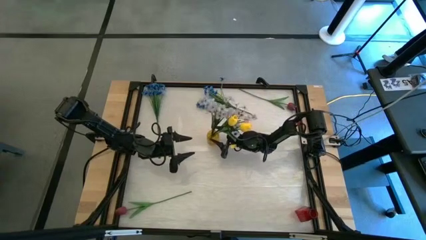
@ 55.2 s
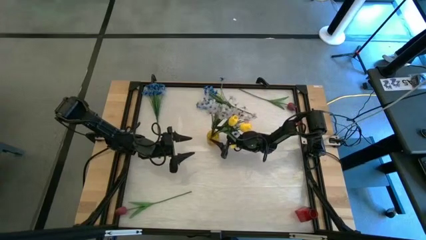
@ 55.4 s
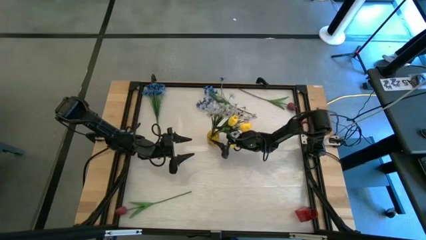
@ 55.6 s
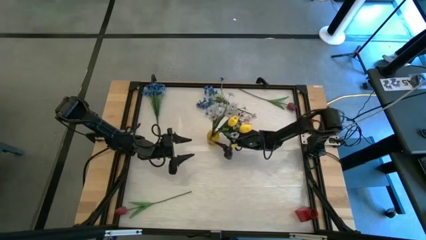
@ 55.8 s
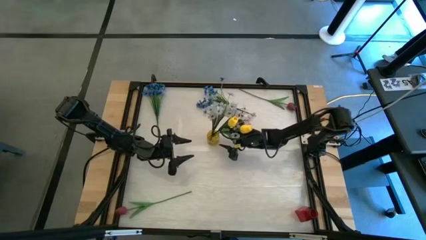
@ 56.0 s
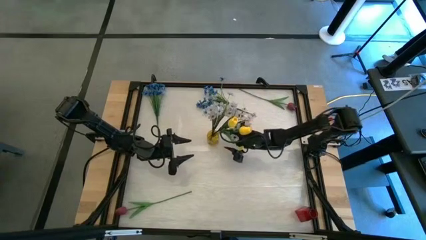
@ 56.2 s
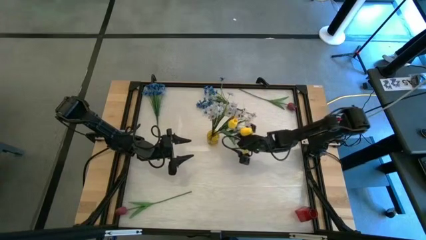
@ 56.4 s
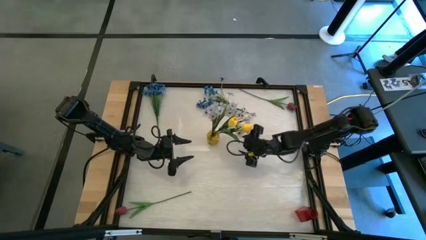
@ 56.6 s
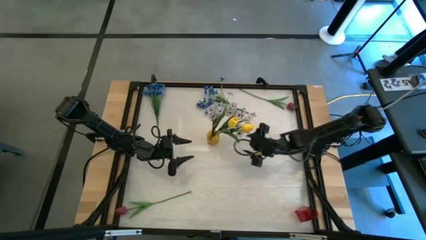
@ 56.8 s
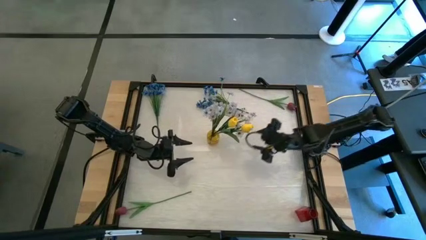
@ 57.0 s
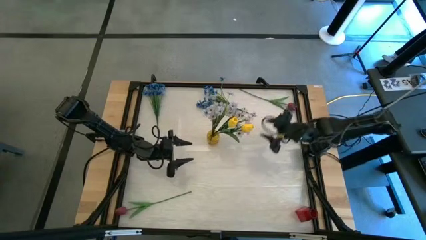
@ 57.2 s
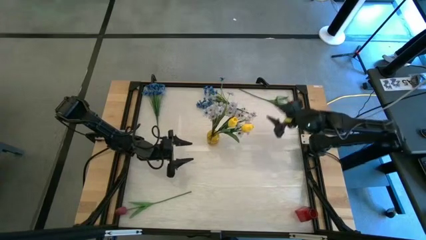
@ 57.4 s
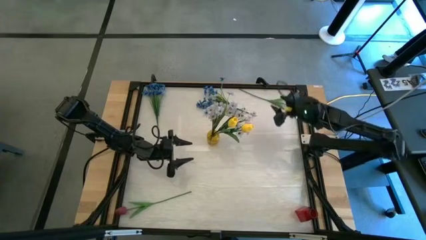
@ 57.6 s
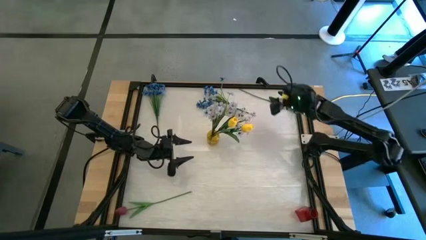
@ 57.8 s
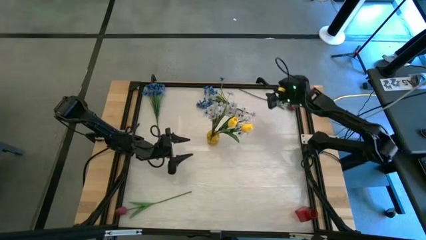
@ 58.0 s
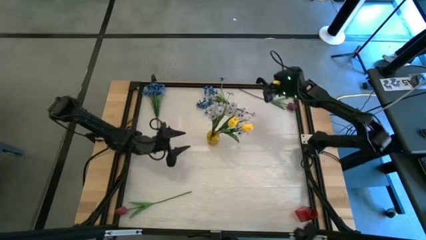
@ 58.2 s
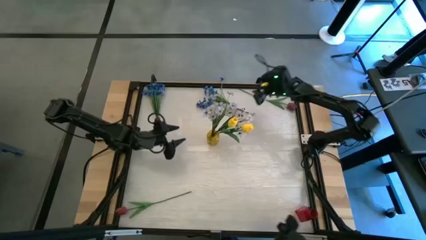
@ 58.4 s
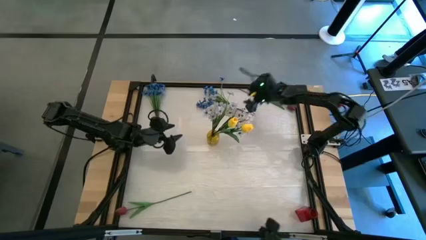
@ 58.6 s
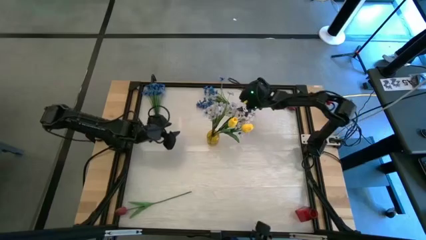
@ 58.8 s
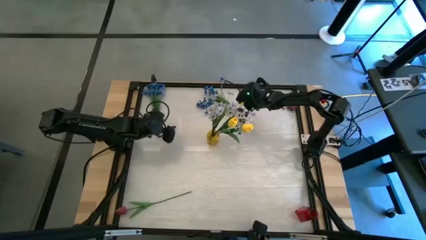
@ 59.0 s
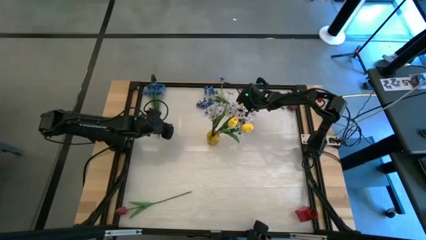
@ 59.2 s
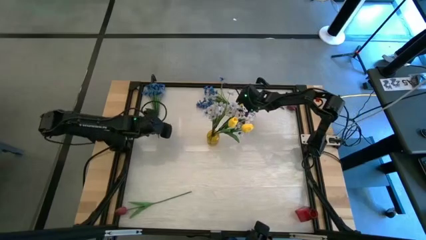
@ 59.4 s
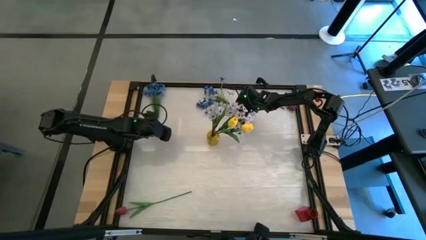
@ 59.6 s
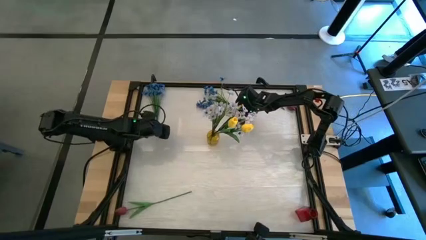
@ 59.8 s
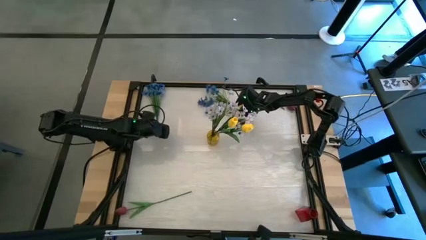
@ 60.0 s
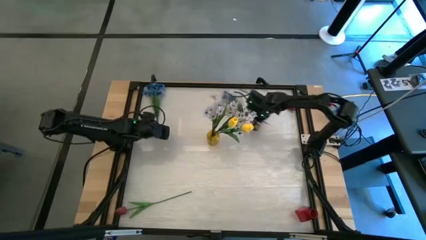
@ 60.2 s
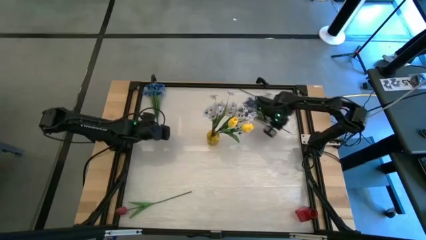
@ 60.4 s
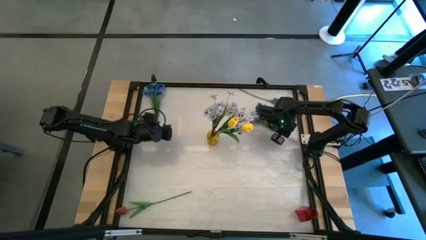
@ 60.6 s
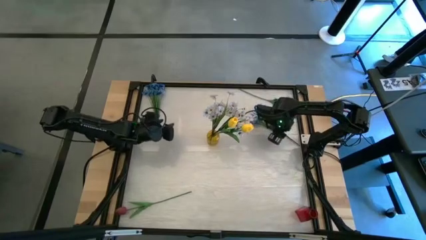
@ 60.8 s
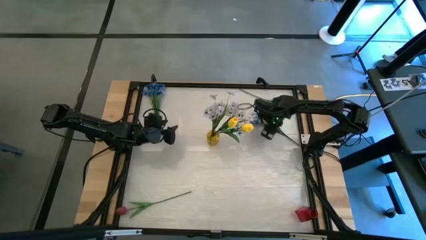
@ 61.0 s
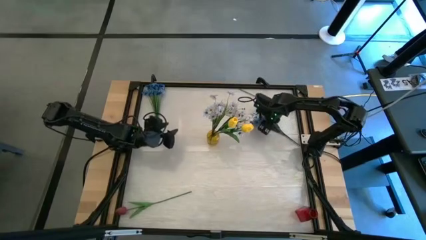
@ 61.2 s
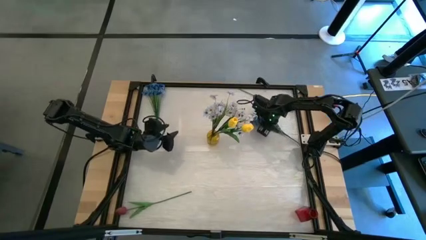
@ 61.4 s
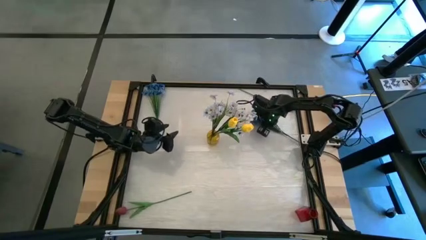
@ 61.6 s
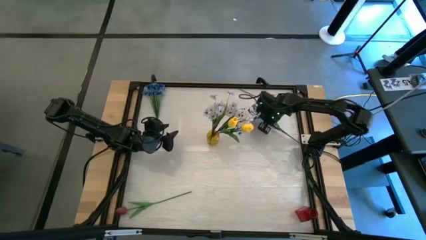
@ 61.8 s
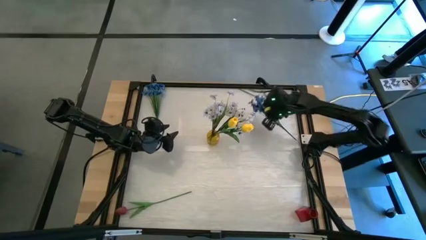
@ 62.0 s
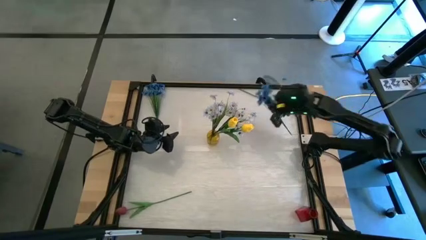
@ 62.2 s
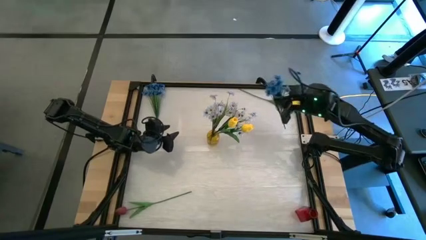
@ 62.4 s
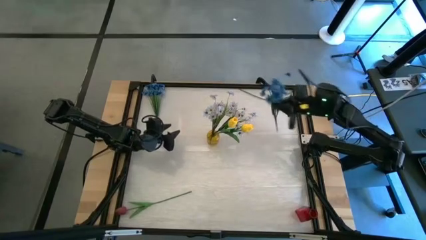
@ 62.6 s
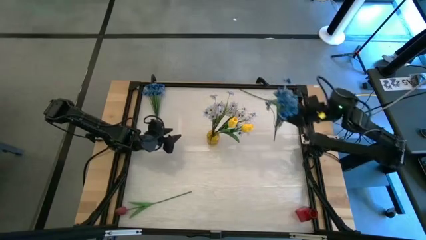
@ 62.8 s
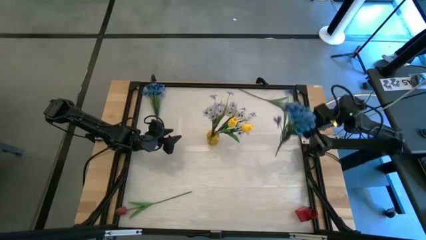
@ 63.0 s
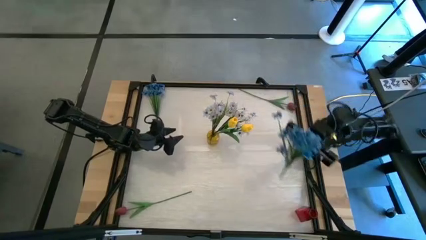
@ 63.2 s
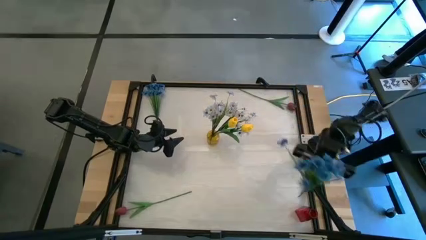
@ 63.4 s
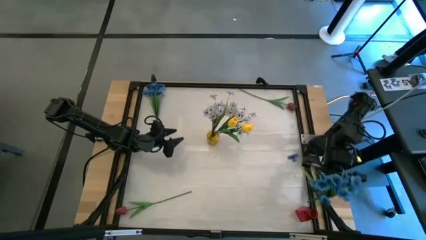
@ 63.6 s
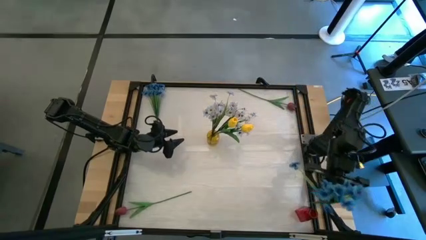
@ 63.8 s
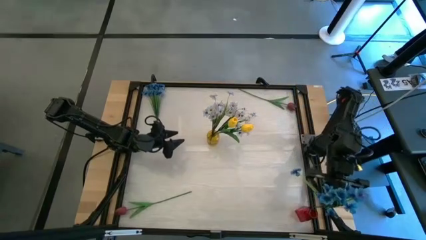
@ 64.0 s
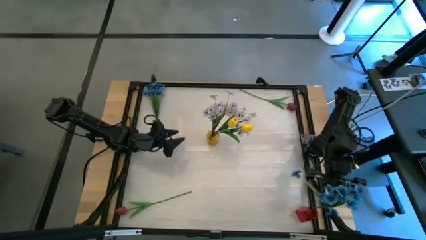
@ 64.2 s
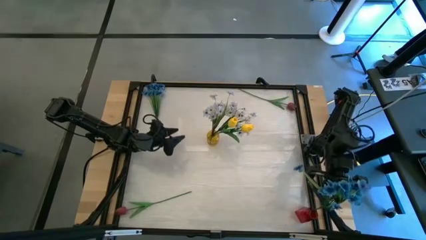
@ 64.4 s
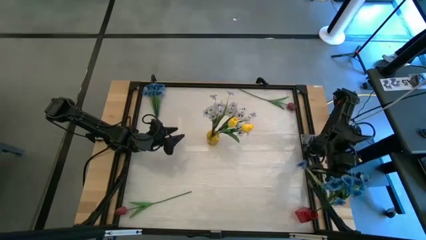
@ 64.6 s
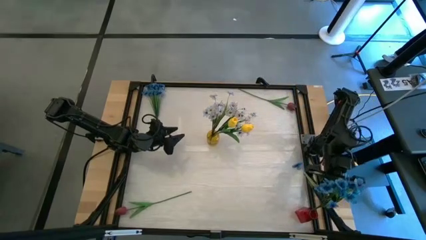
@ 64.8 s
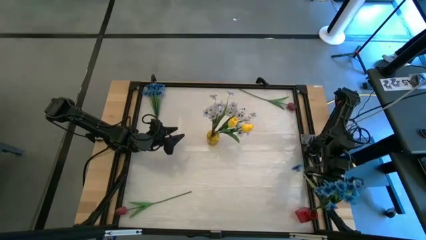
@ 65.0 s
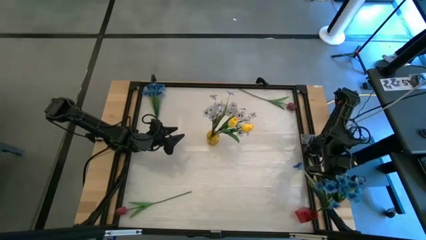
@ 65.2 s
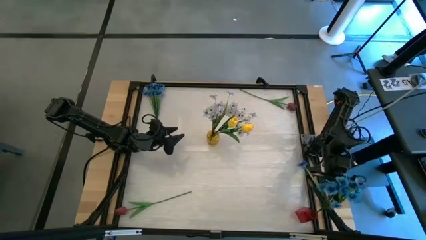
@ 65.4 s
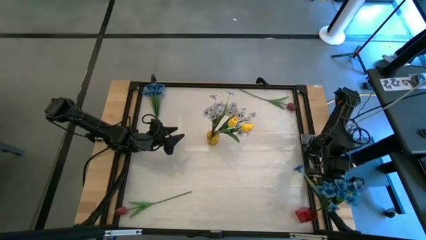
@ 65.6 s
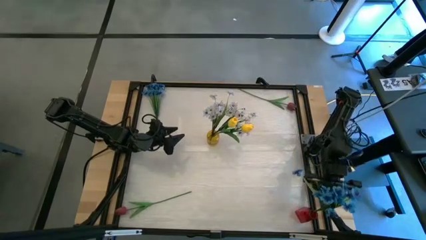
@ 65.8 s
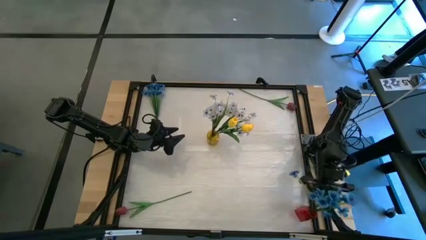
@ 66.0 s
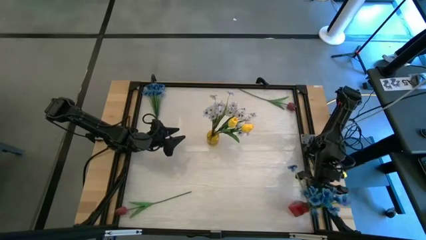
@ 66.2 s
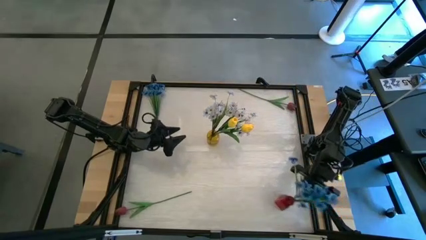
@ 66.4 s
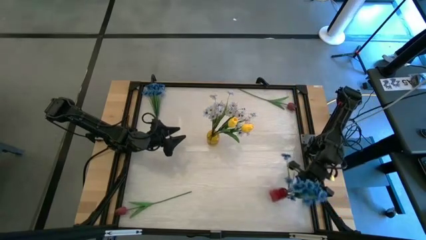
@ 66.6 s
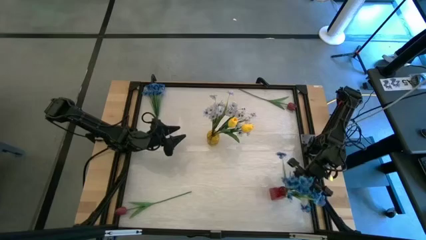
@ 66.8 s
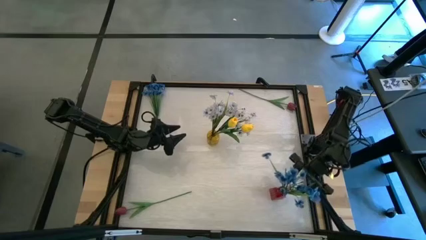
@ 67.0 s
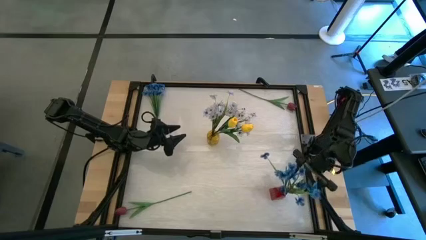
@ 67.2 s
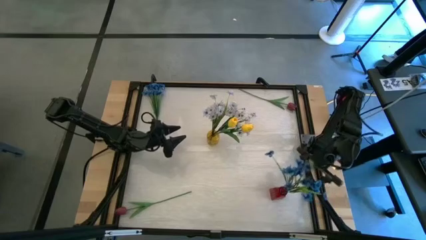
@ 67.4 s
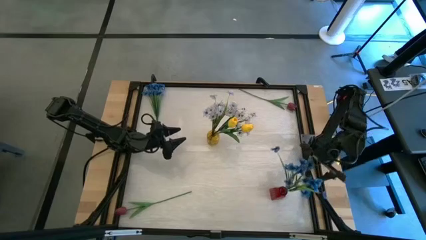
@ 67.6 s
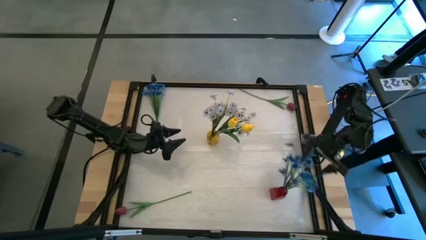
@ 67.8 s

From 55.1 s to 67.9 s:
Task: Sort flowers into vase by color
Put the right blue flower into the red vase

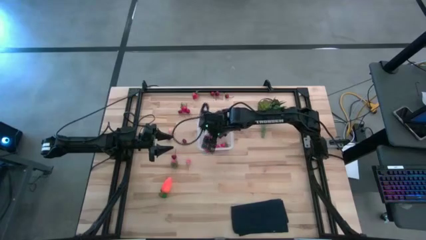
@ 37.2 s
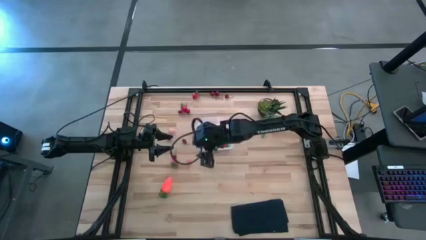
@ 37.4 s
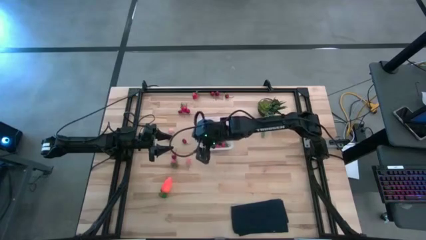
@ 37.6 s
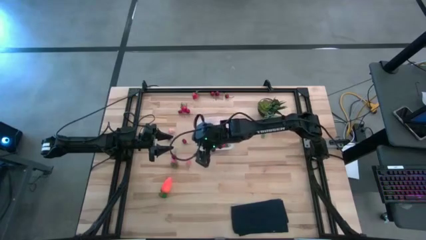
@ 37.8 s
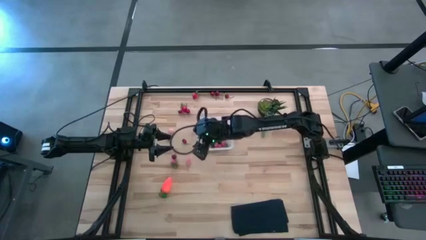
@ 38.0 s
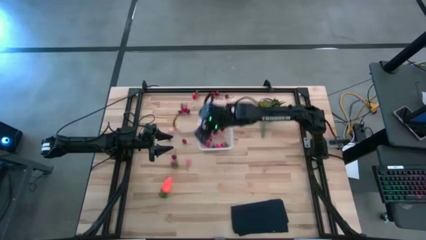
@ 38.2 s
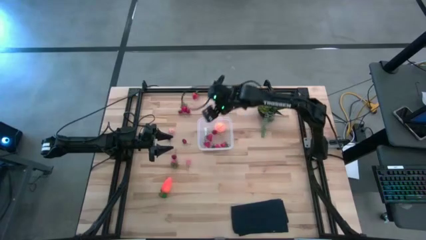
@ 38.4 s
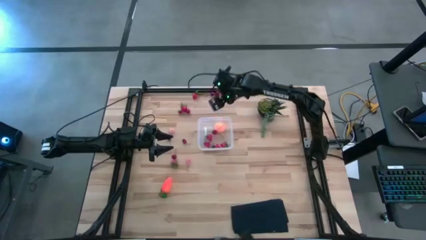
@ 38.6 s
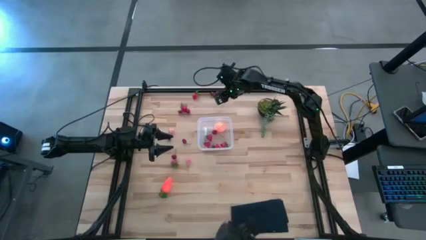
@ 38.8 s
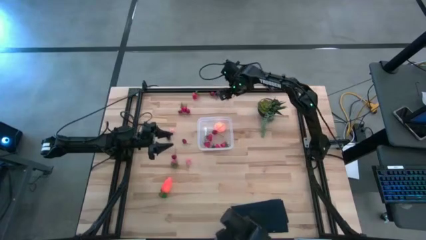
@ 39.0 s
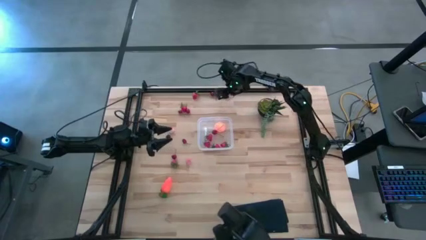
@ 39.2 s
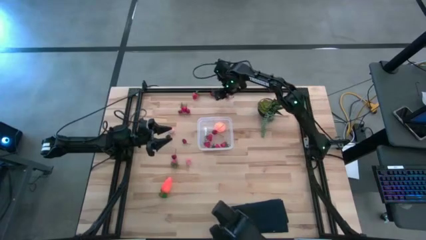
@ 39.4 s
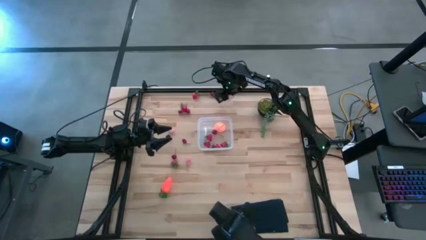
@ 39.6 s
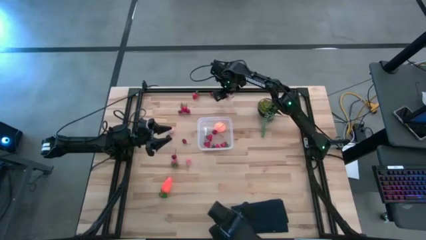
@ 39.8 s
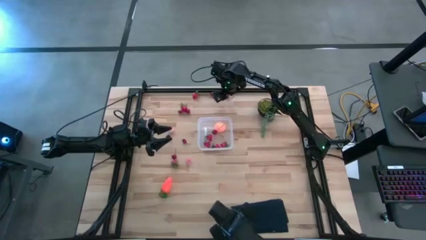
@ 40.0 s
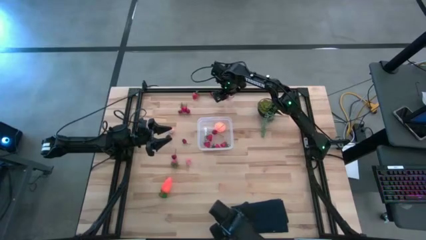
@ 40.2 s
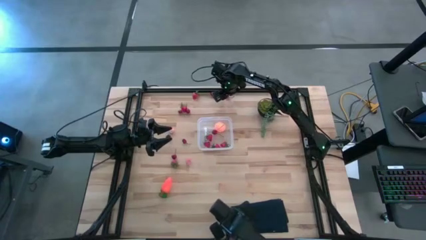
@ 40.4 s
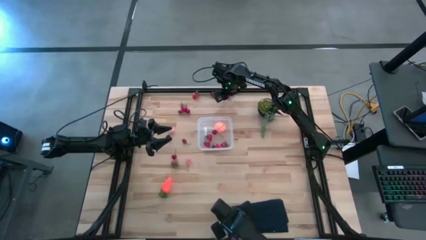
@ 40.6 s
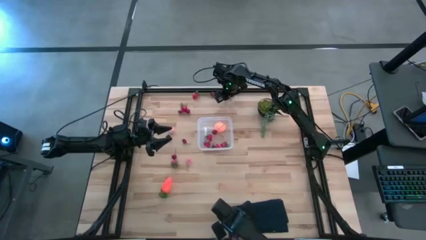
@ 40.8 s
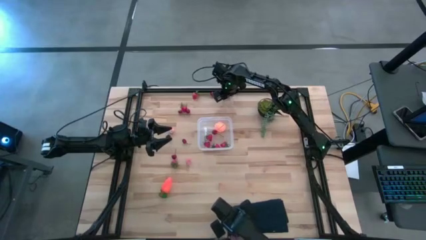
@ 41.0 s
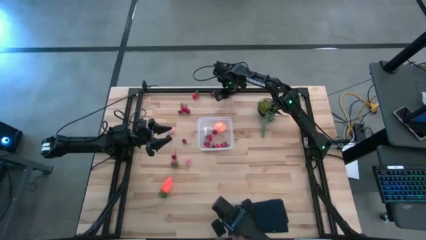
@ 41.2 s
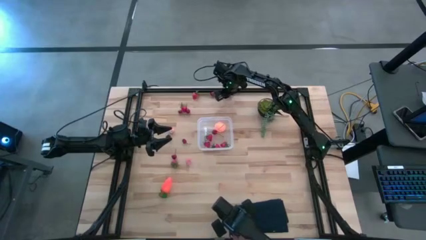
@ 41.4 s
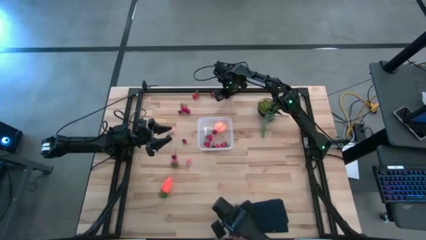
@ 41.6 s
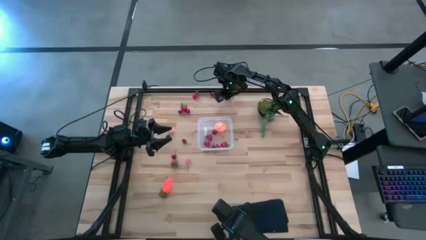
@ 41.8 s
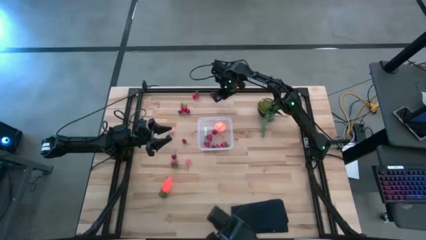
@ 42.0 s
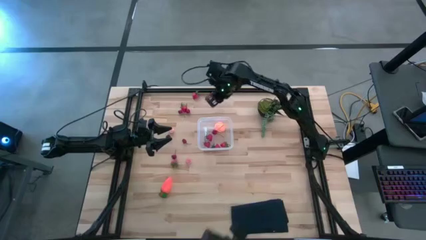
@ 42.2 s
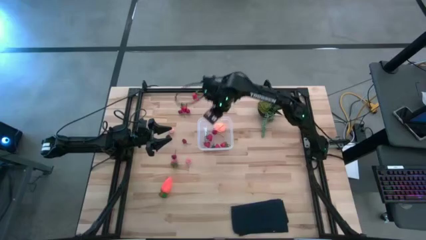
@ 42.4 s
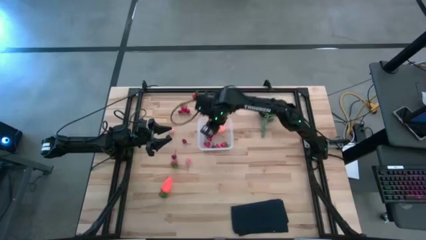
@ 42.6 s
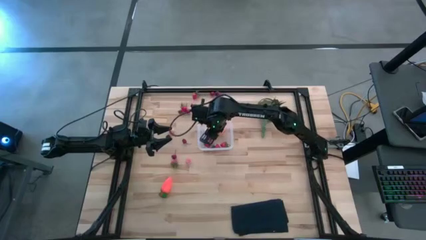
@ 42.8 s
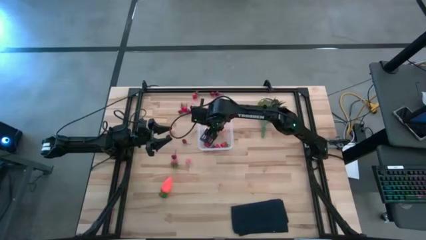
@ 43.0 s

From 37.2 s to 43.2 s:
Task: Pick and placing Produce into tupperware
Put the red cherry into the transparent bin
